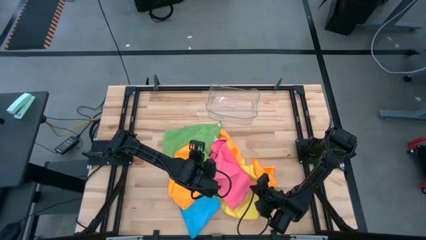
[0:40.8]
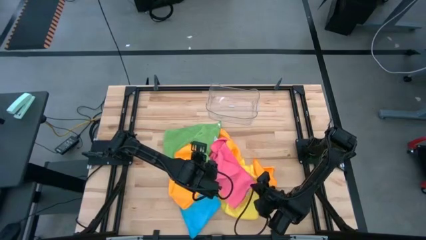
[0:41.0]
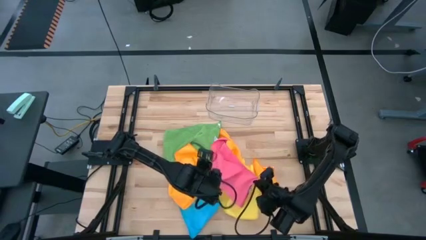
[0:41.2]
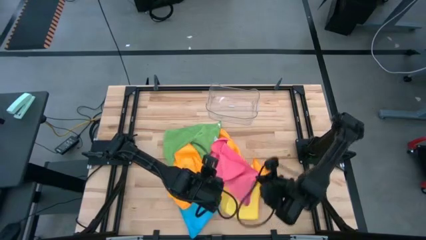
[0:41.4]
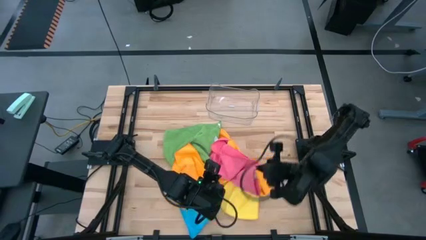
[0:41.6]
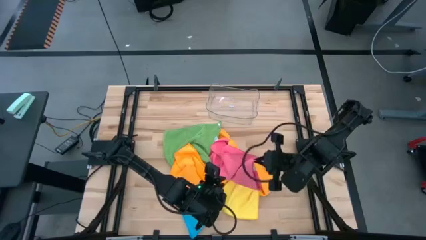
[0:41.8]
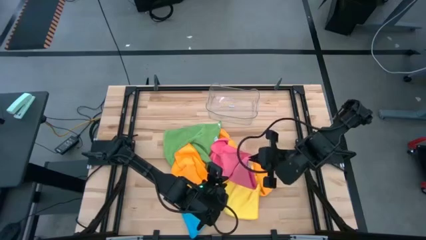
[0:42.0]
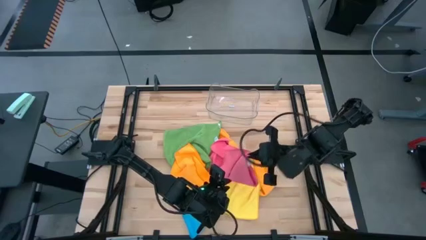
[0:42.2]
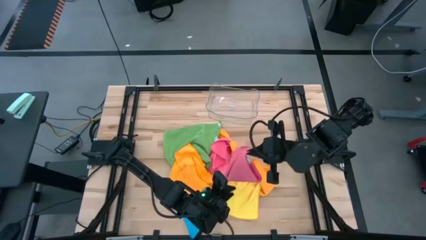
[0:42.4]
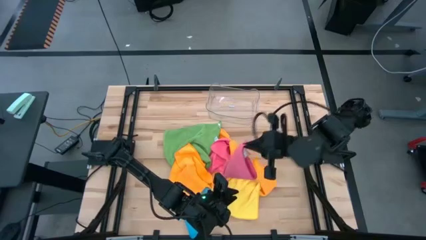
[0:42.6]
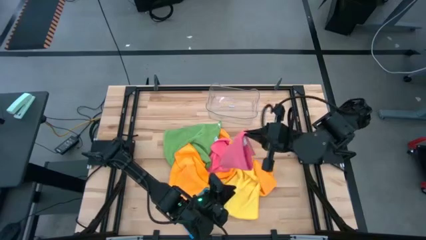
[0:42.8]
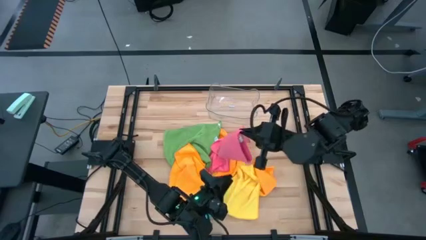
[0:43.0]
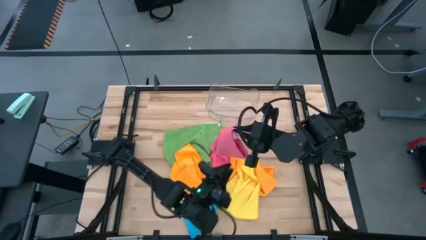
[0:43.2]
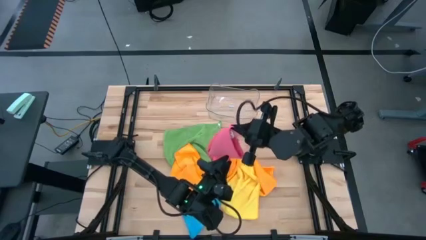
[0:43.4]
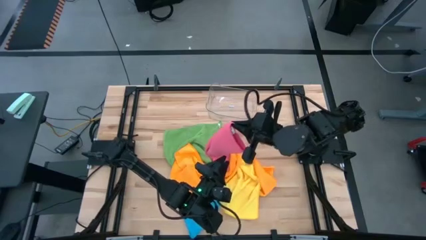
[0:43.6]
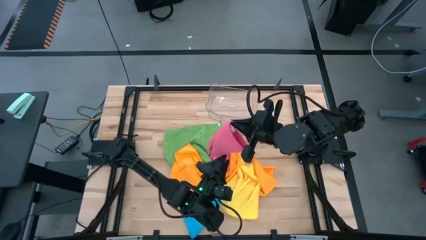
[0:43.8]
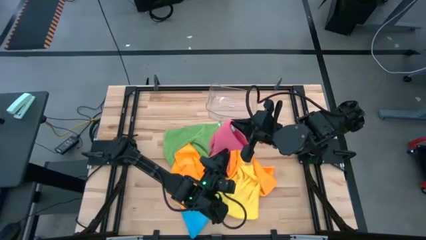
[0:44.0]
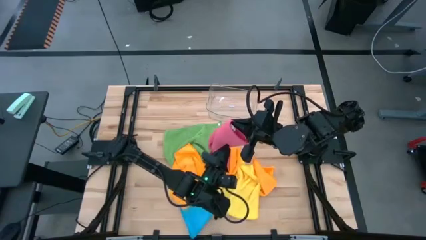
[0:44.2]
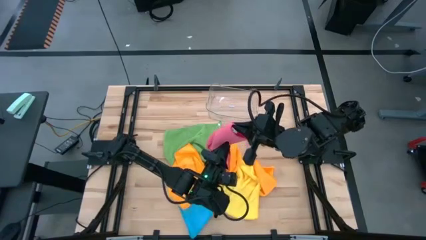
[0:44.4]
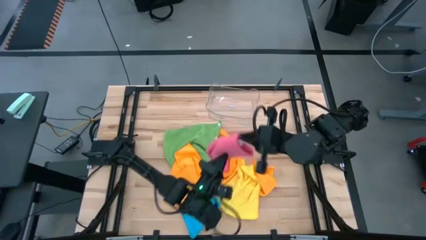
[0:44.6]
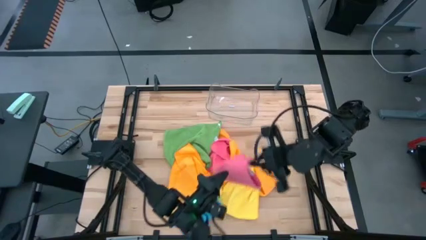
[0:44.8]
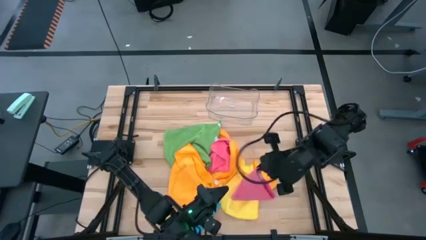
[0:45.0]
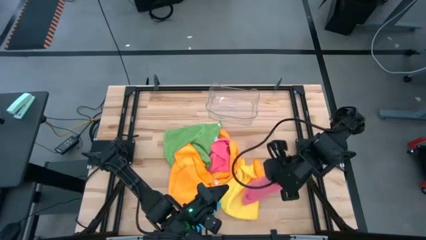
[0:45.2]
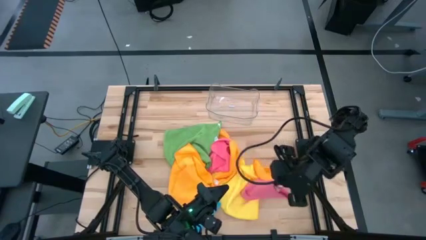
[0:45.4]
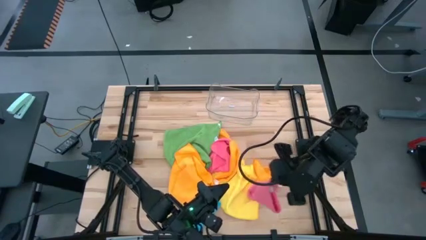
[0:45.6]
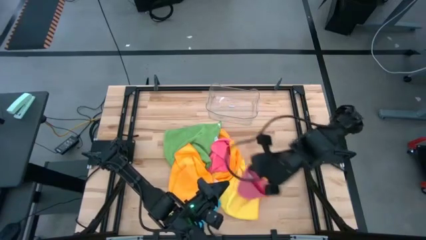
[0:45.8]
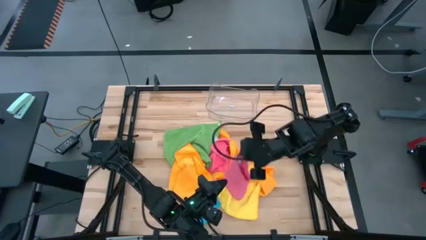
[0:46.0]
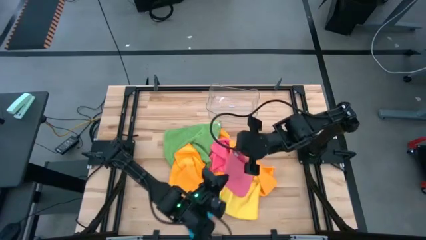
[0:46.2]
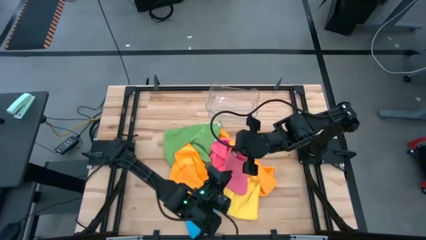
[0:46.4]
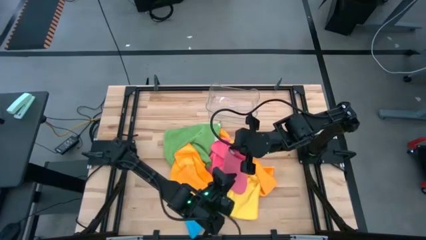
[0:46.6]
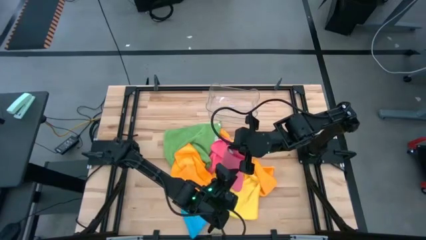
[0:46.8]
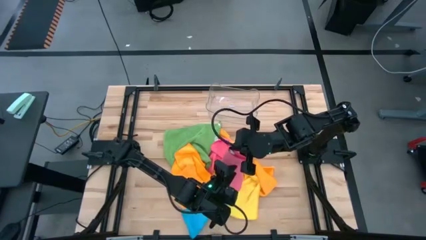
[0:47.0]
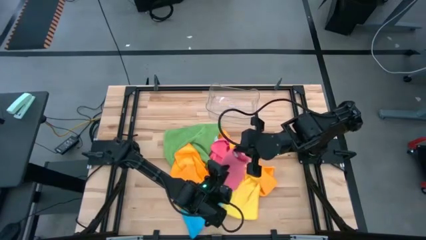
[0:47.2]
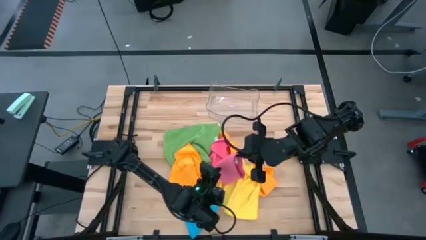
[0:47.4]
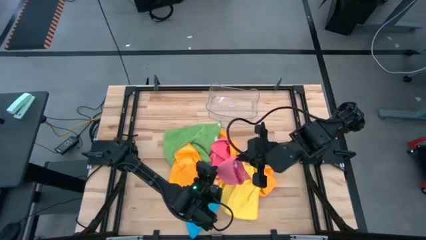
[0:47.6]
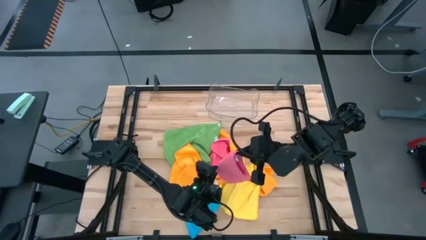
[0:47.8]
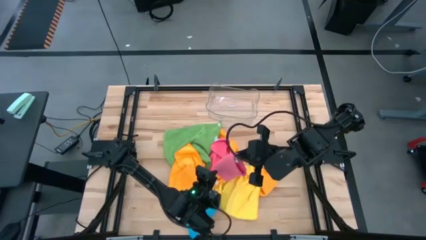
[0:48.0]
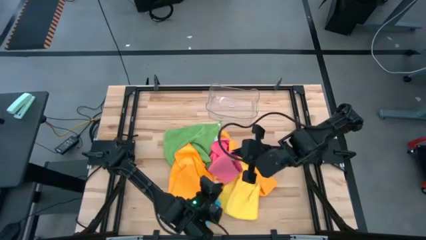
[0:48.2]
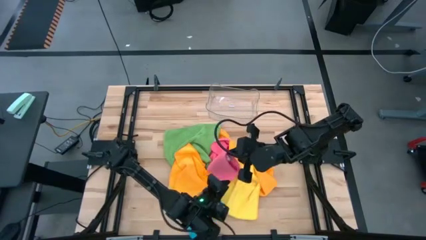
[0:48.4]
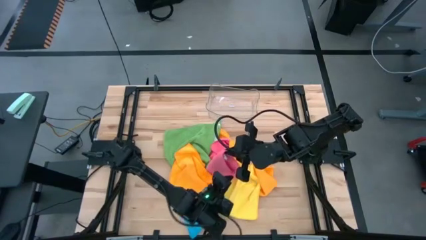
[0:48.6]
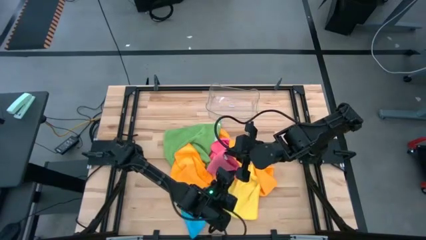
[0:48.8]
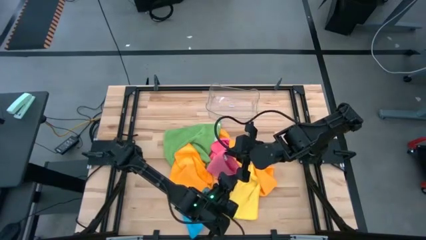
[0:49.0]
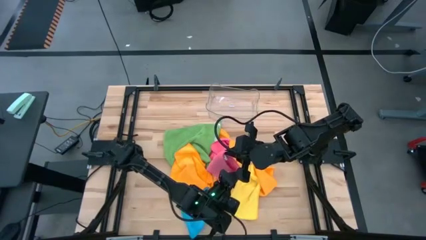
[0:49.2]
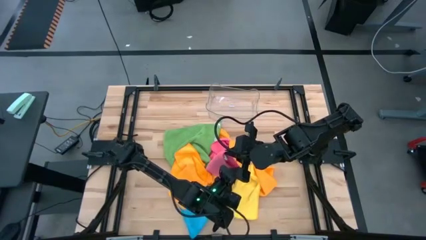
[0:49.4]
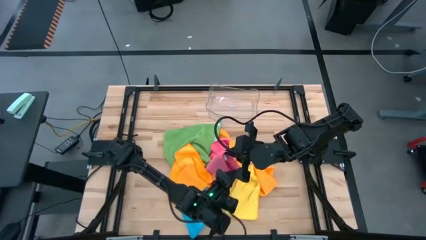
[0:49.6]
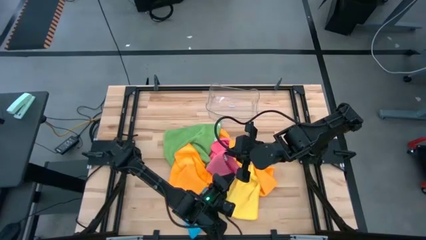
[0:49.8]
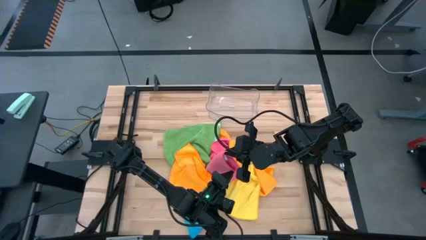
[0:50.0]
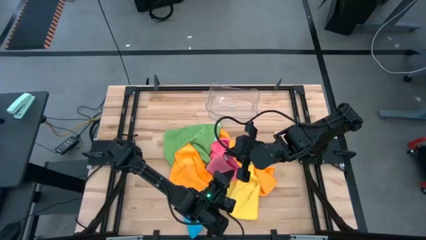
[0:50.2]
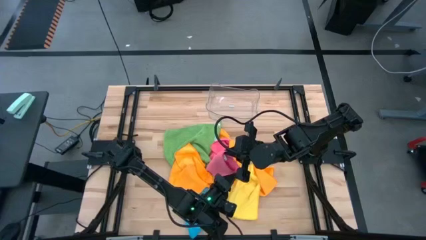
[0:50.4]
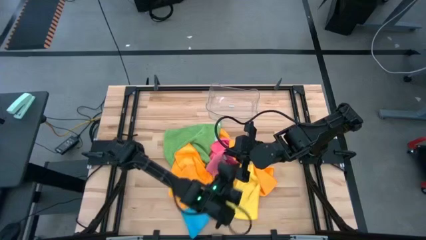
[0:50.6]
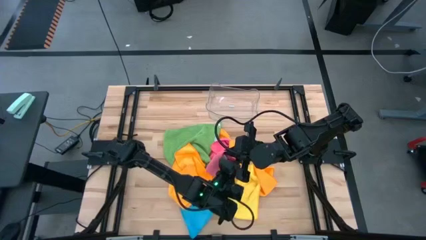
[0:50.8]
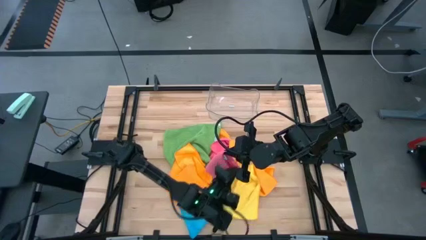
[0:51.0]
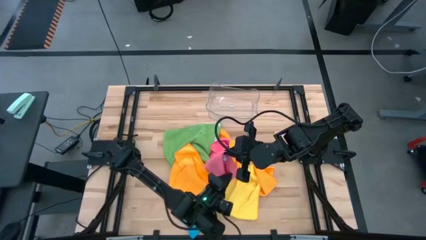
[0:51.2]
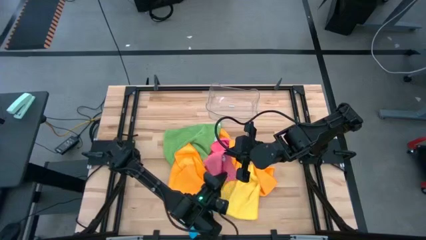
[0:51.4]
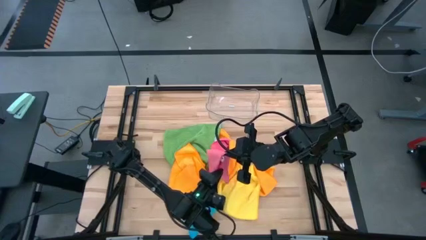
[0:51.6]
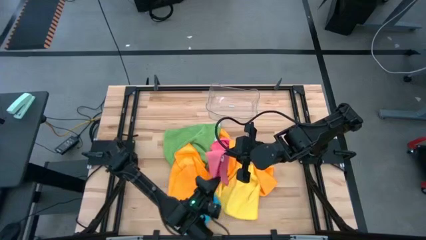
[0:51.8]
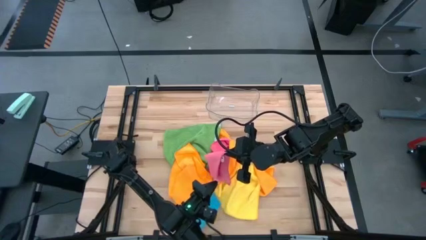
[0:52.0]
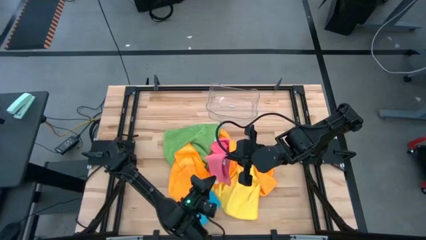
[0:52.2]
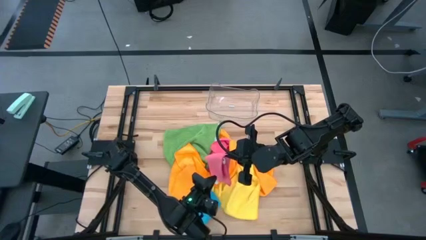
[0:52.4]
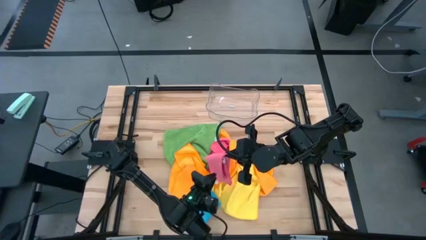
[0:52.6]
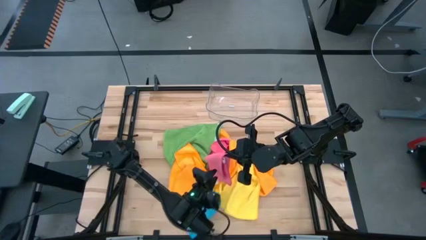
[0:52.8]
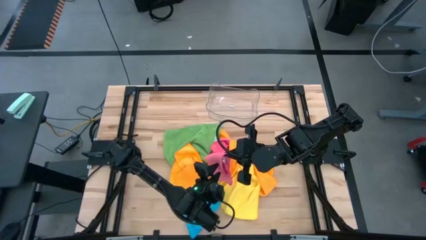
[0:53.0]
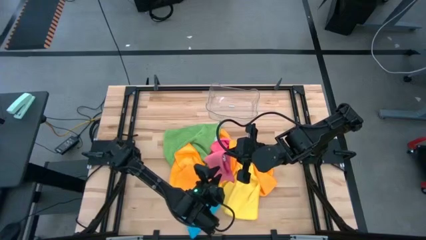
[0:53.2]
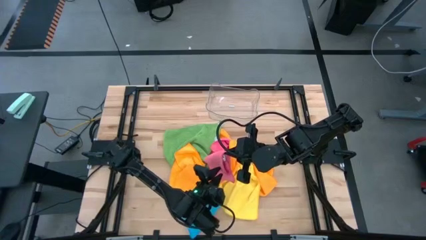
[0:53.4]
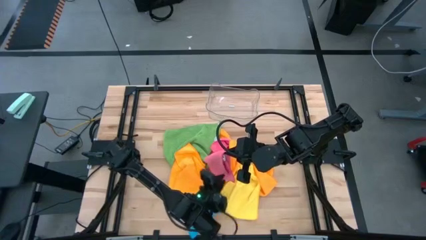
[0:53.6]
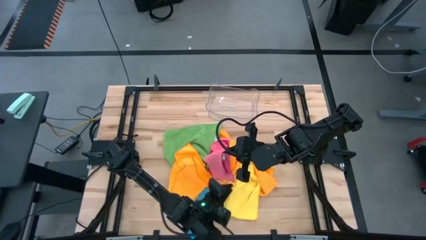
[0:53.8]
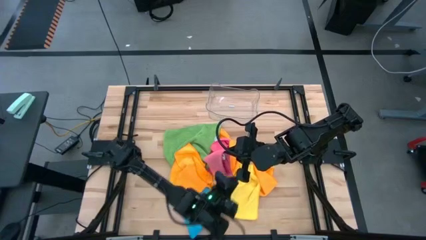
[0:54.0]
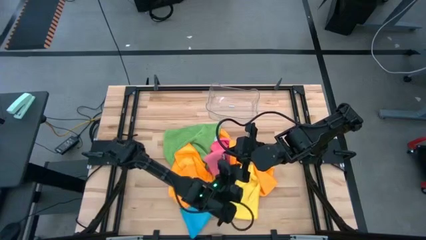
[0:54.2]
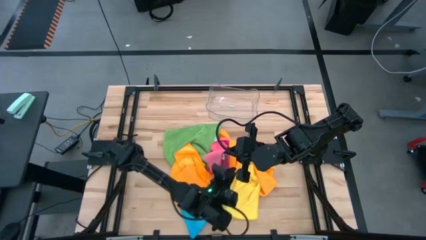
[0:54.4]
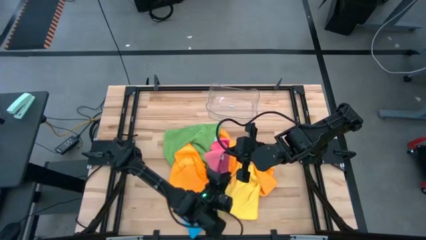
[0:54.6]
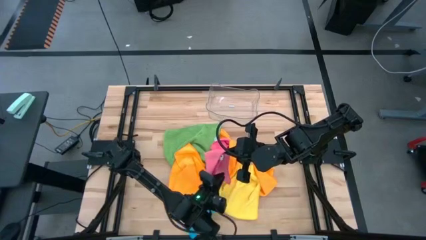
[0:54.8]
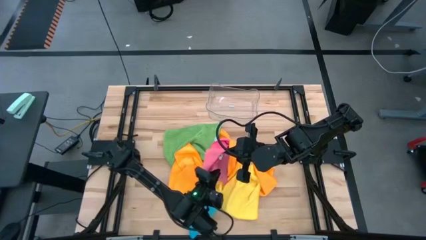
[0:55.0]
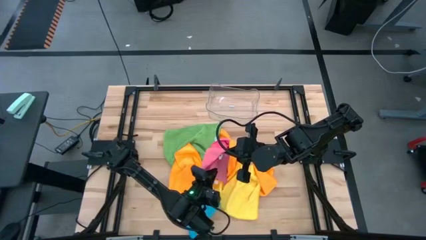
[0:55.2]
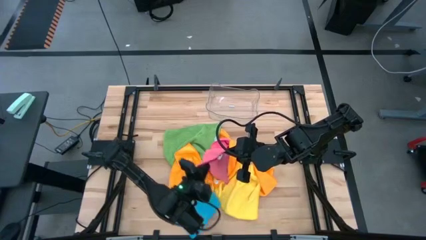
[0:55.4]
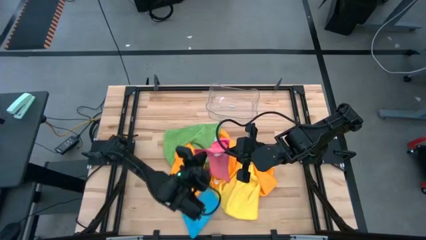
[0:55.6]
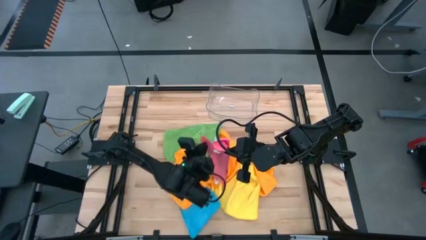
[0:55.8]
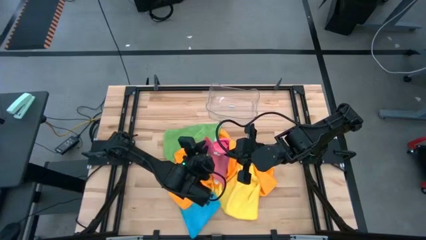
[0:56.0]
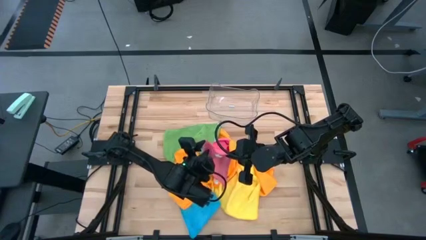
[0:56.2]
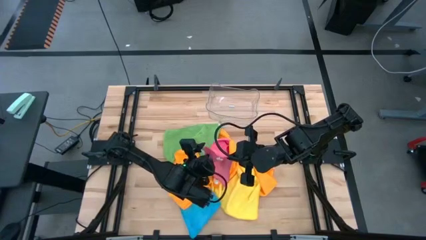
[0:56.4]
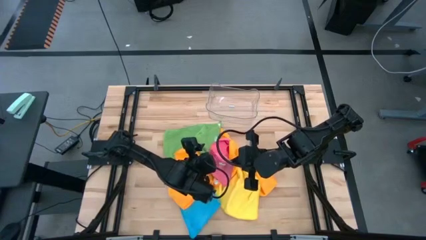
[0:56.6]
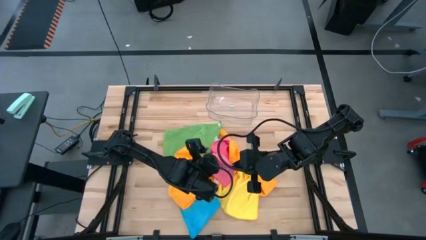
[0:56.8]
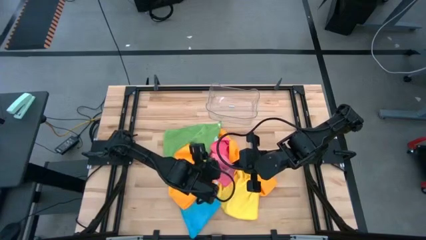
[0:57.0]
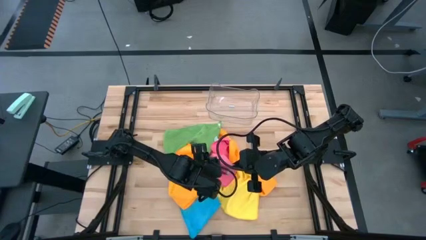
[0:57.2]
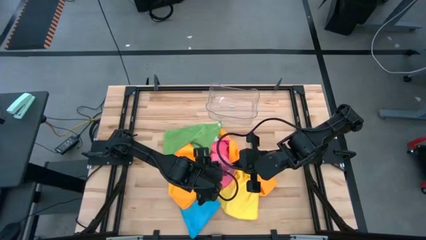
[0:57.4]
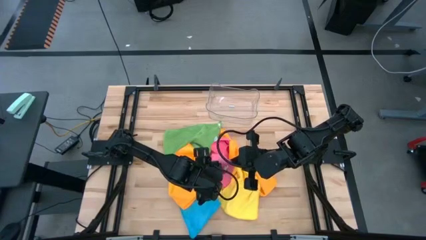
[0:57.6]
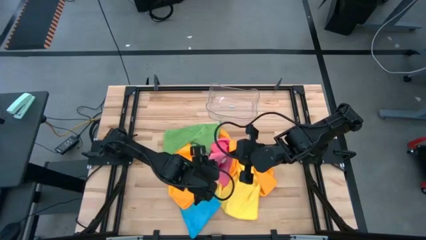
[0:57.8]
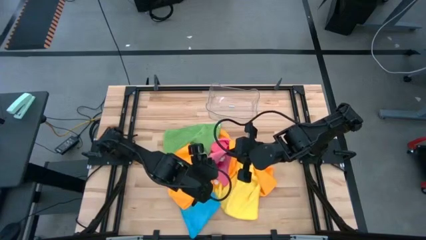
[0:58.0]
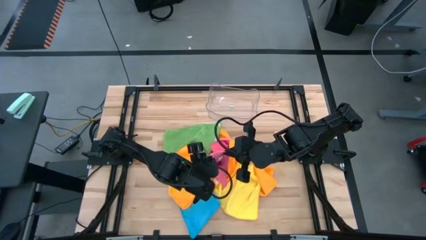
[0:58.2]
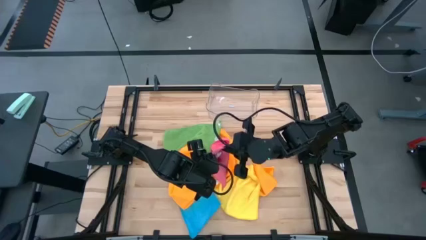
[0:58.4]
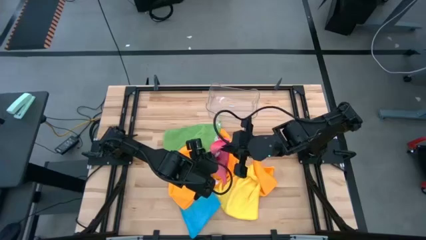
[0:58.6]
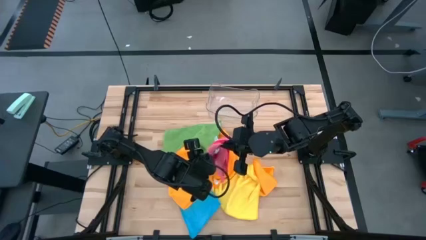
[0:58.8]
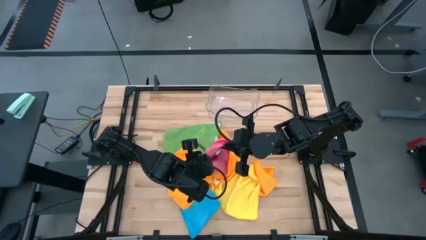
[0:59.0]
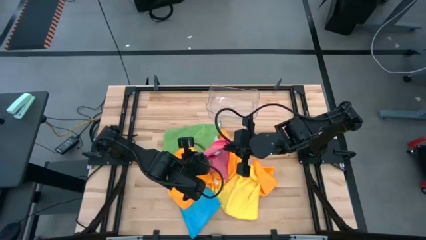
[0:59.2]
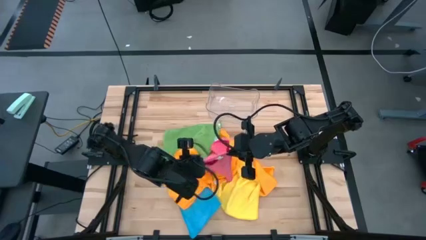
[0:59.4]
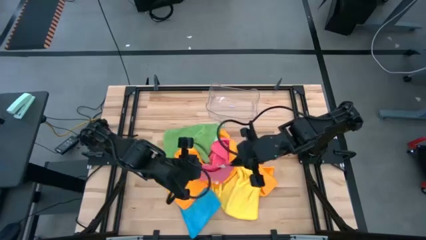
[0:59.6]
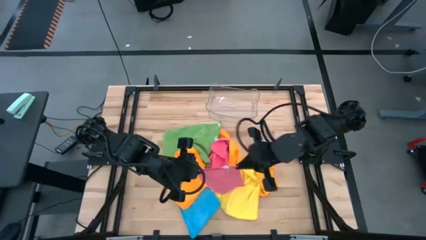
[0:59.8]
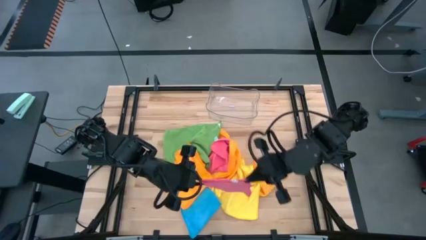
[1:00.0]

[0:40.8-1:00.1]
Task: Fold microfiber towels
Fold the pink microfiber cloth
